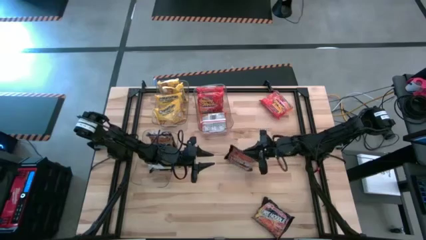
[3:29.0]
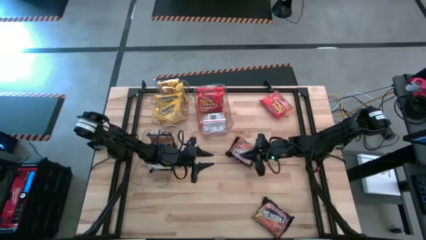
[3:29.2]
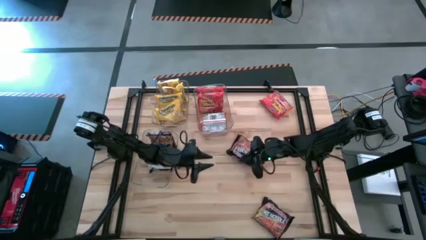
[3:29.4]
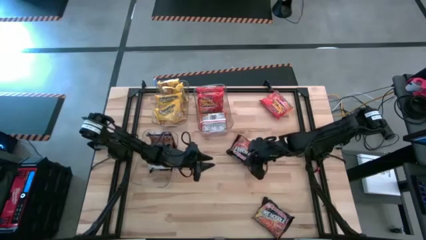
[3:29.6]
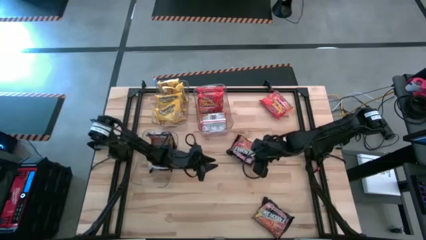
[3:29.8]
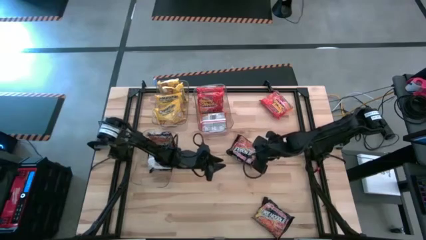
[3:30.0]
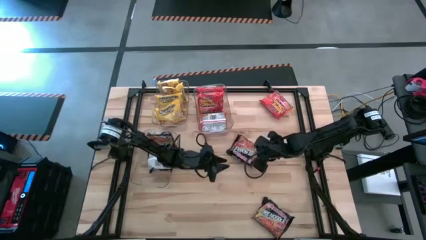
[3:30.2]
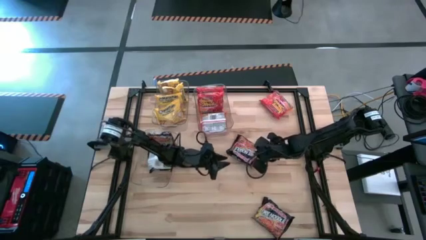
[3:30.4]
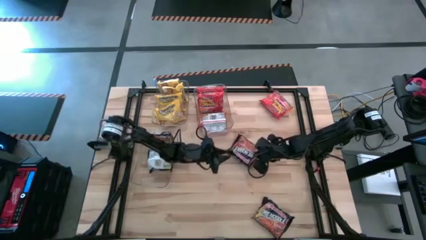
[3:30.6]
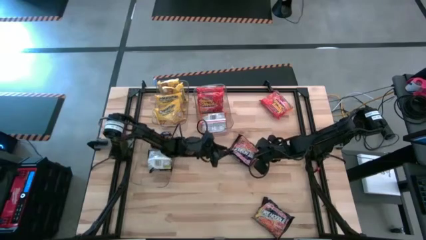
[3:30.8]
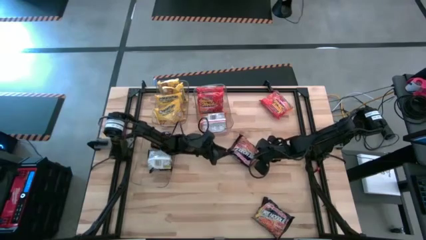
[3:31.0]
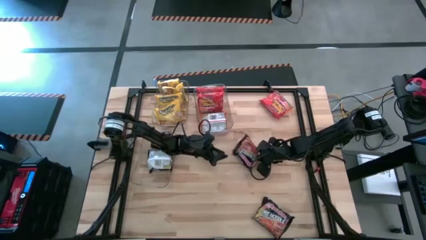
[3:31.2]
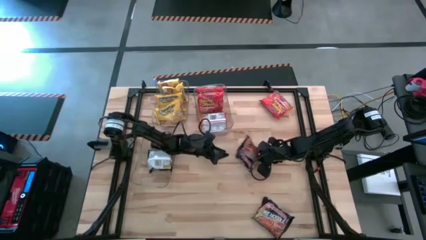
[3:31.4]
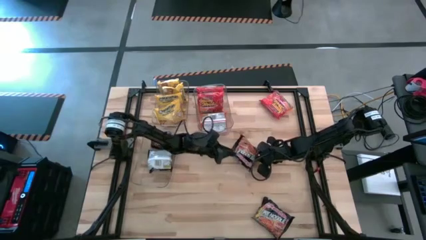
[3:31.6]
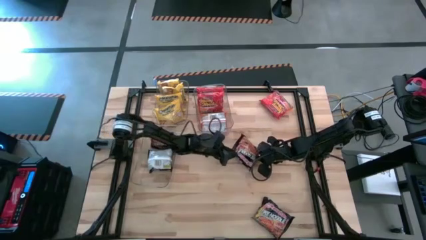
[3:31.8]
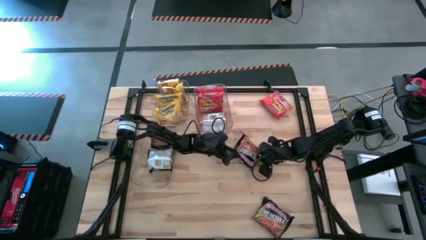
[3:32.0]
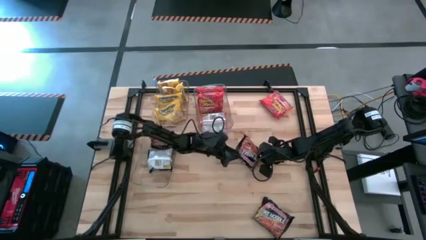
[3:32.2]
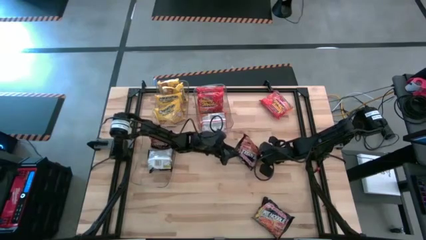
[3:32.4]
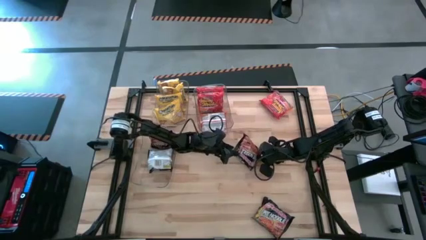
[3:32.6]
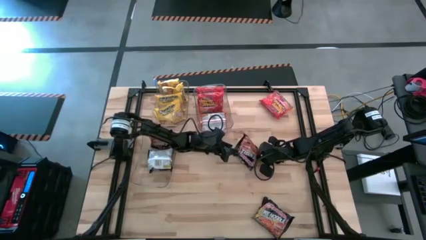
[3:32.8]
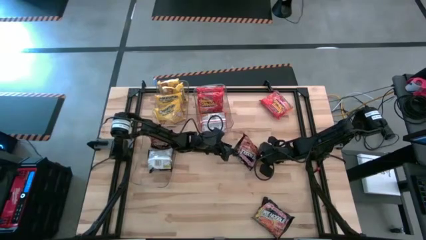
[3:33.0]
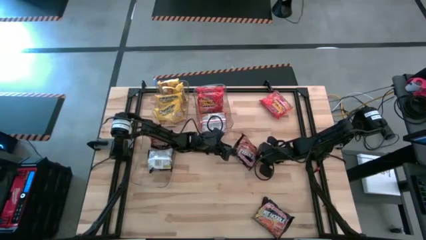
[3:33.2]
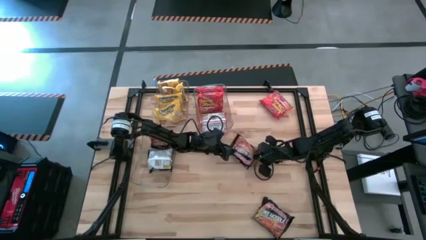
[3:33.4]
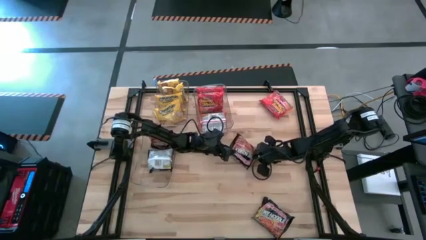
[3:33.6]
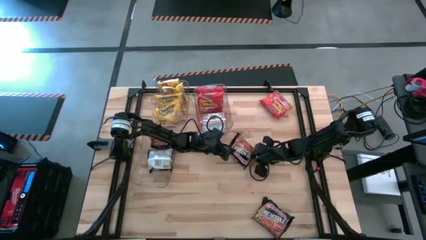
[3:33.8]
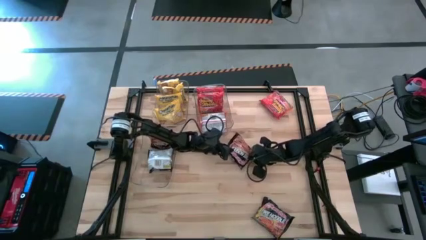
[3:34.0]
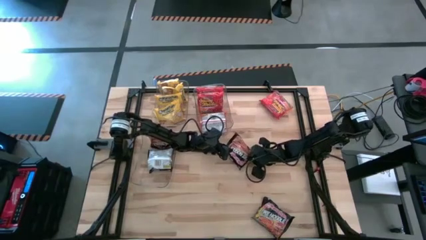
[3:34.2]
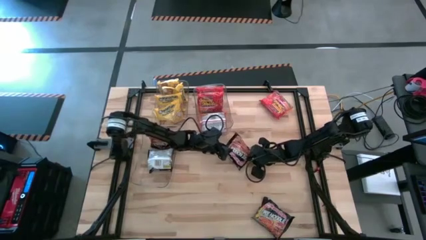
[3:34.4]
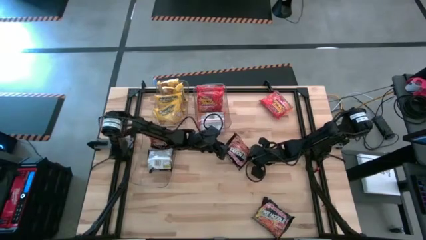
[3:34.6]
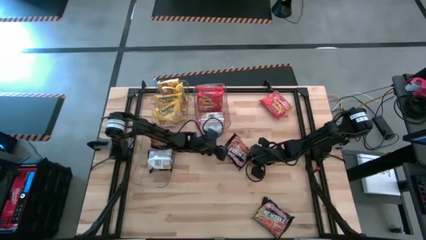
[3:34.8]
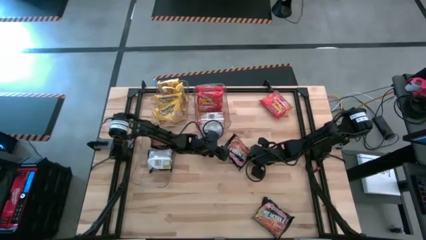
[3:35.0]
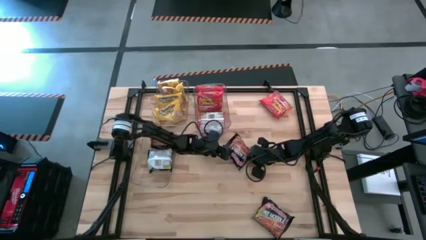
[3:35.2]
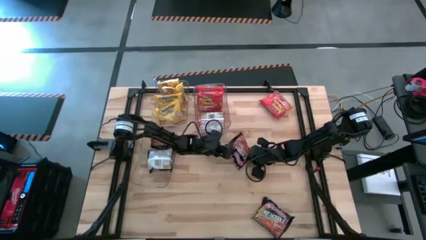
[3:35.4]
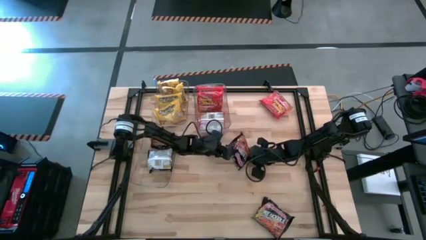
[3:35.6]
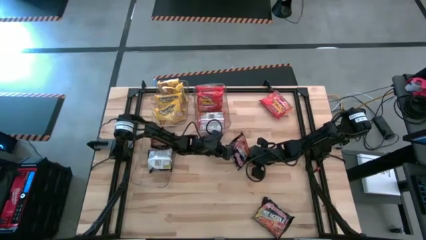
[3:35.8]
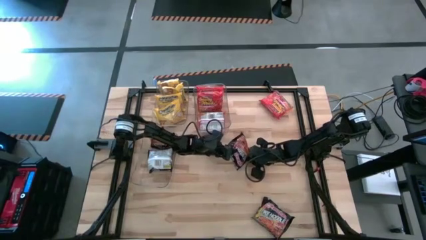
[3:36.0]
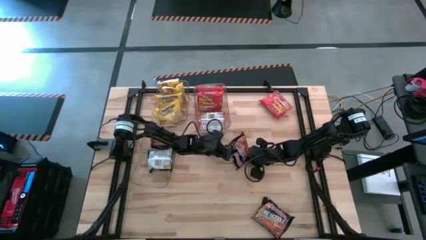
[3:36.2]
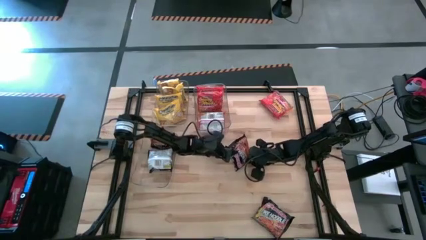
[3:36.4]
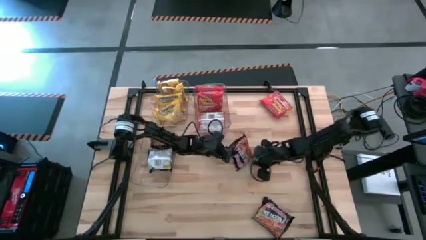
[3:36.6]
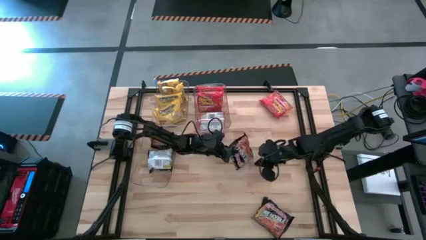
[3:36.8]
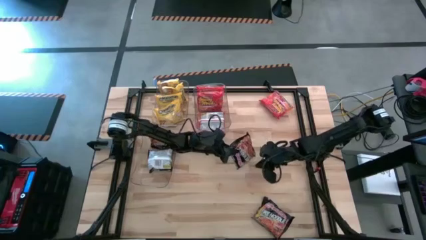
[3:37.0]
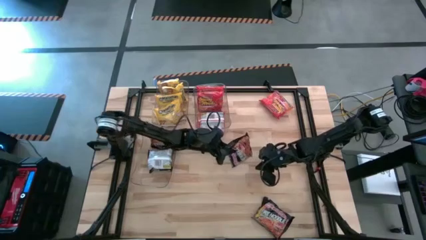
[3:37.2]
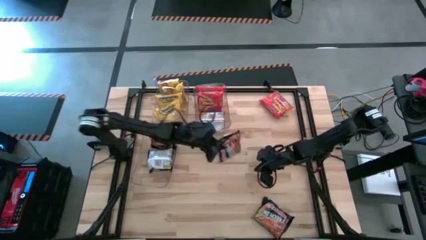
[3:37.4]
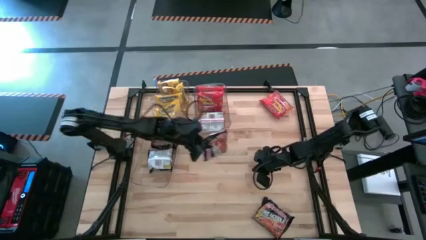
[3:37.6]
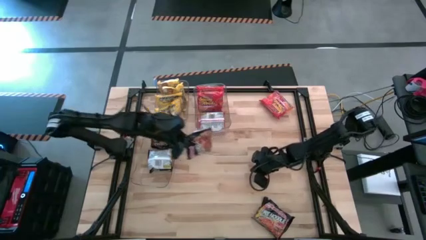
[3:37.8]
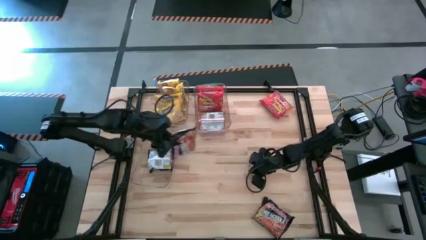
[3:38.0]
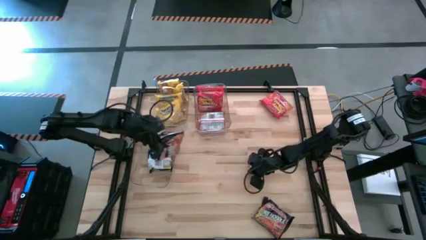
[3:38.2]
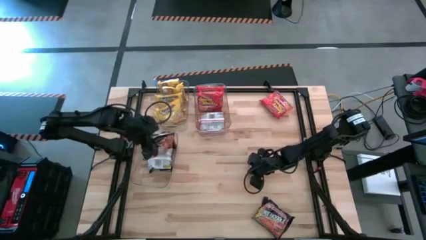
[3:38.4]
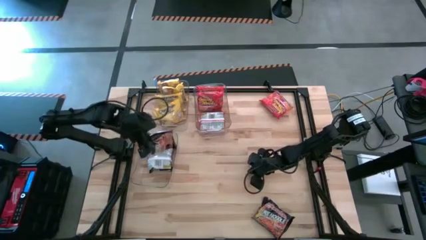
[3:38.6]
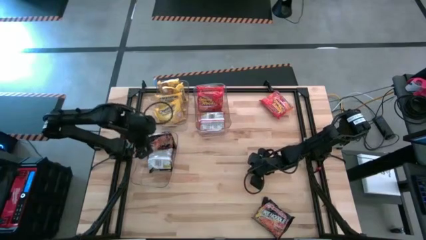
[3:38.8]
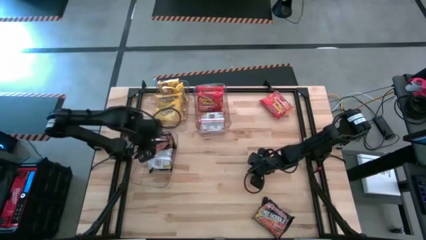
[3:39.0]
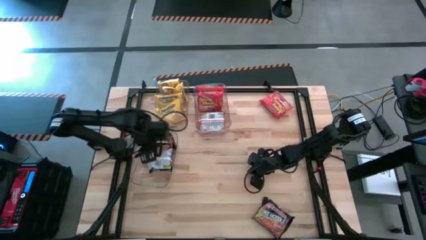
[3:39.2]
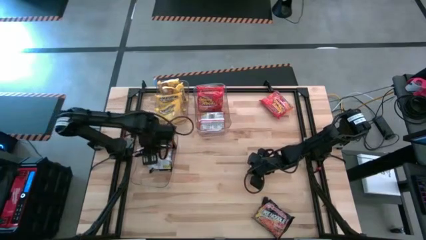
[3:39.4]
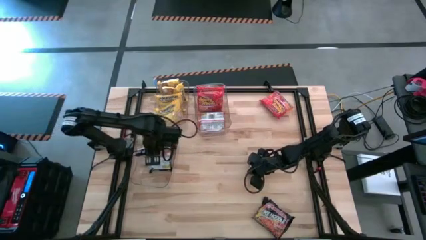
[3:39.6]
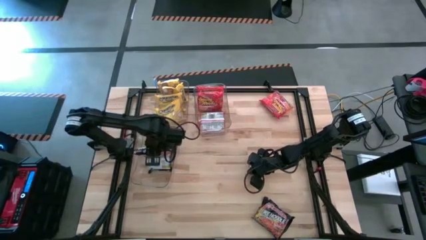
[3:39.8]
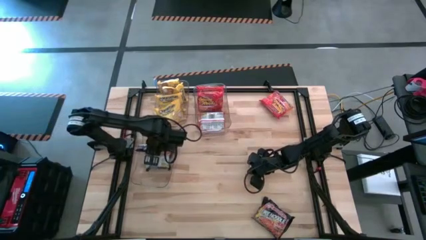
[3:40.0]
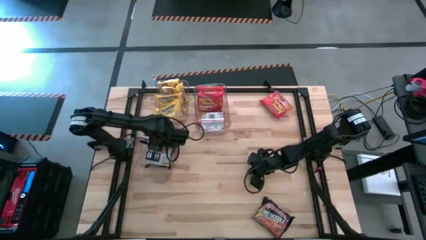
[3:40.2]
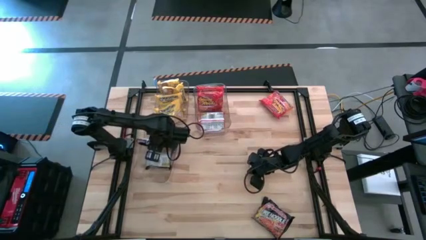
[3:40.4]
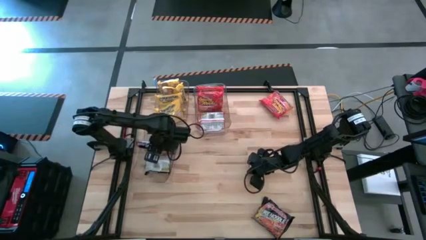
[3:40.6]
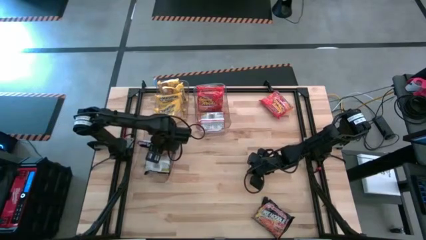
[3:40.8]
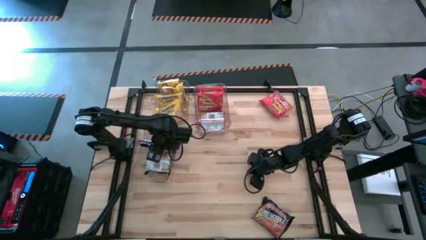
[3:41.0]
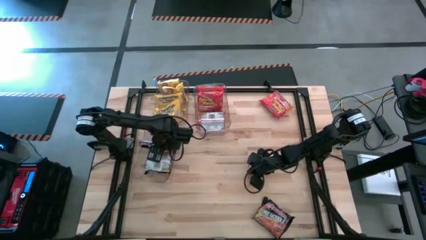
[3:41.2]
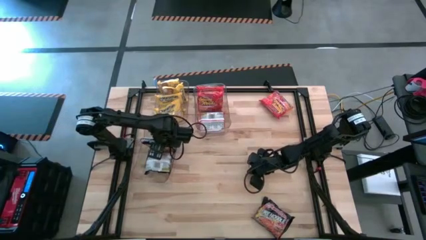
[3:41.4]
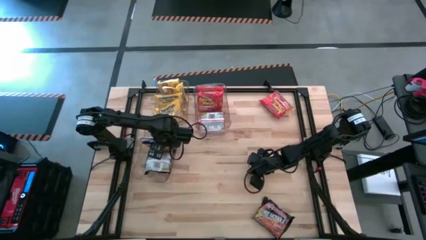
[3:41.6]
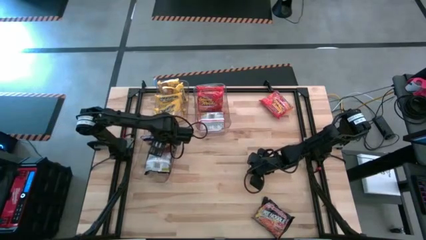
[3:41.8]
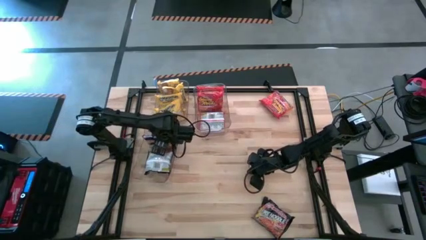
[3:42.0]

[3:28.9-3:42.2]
Task: Sort Maruchan noodles
Put the black noodle pack into the bottom transparent bin

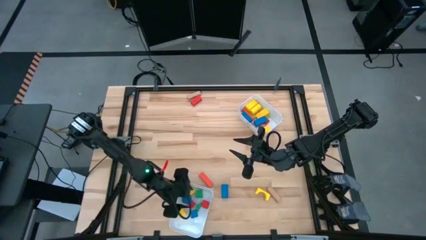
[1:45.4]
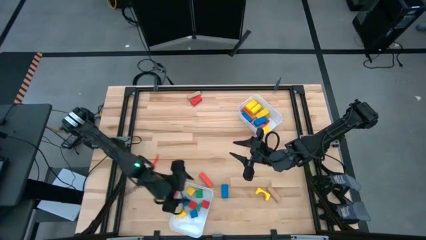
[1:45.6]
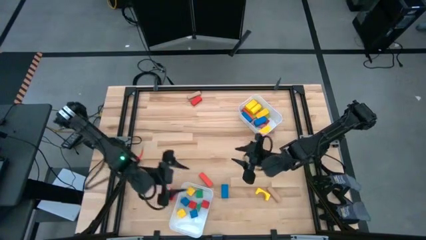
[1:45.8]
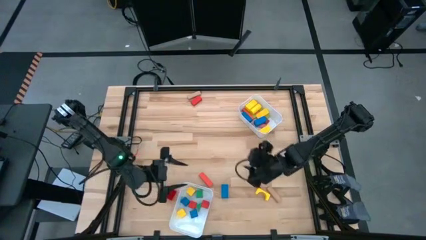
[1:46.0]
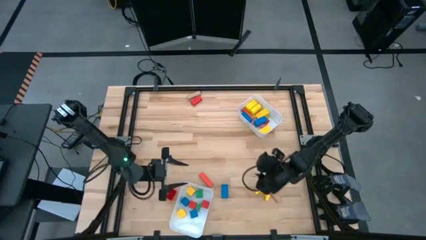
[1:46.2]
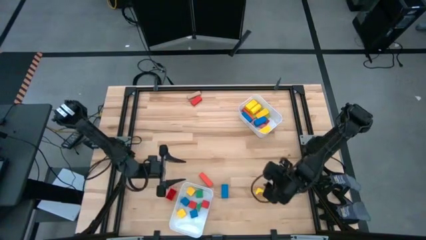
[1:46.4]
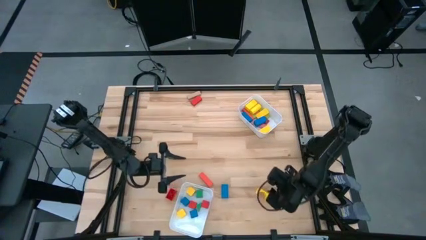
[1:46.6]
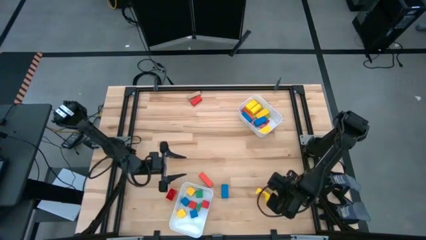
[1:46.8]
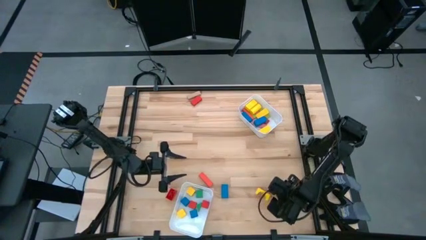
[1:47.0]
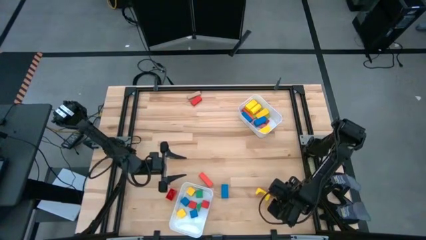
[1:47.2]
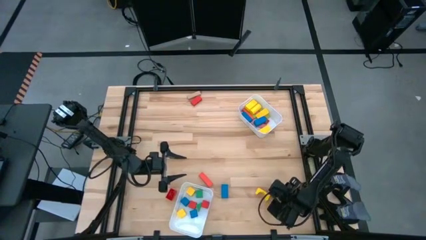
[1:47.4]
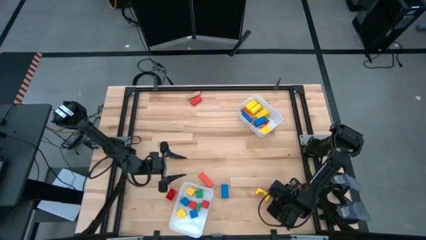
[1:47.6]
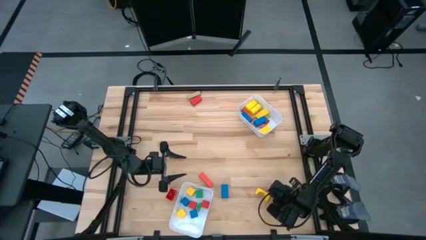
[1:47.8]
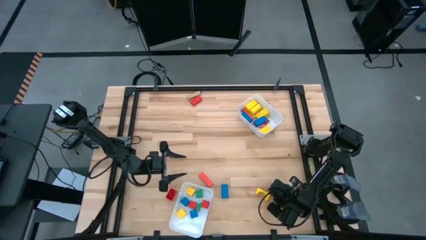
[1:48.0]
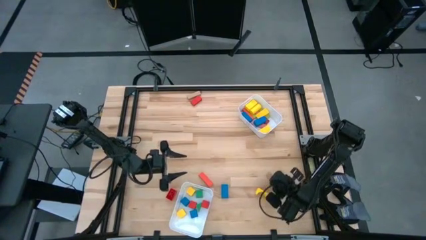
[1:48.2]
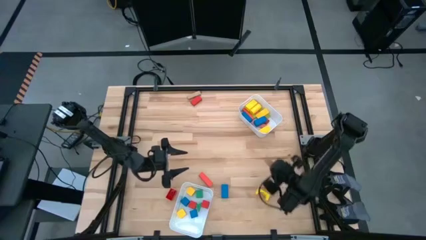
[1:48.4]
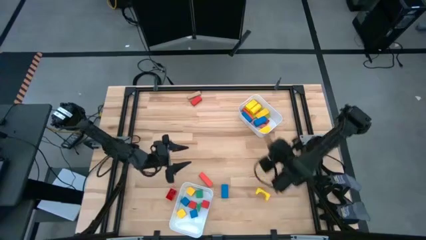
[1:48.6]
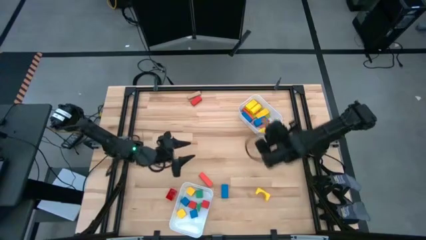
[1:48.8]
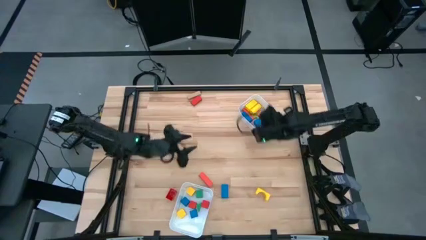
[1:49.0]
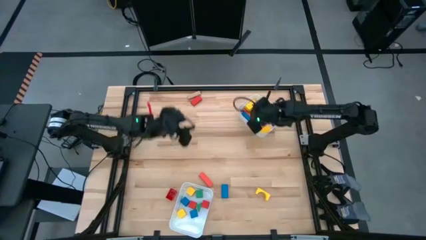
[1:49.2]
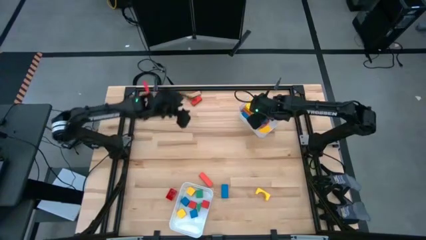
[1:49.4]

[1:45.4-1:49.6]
Task: Sort blocks by size
Put the brown rectangle block into the top white bin
